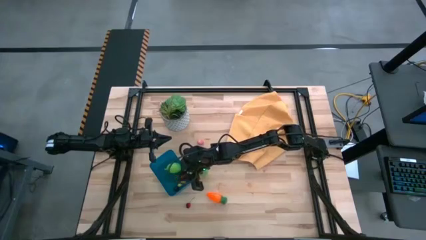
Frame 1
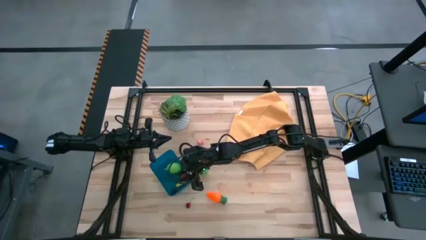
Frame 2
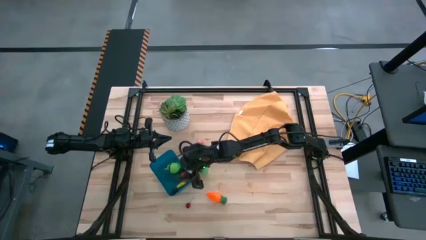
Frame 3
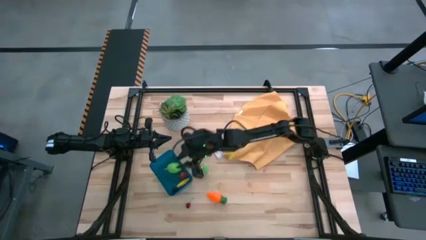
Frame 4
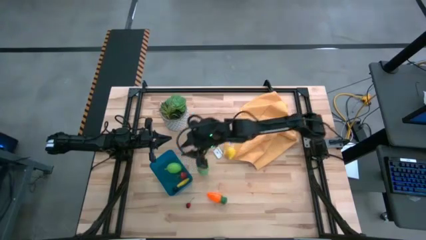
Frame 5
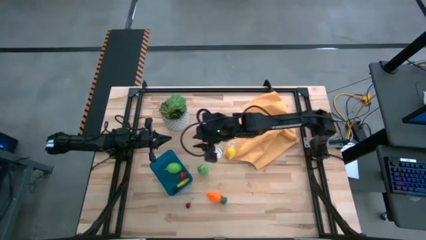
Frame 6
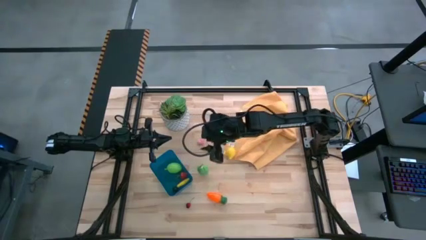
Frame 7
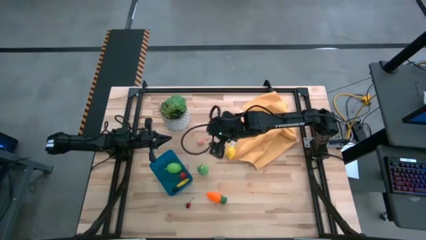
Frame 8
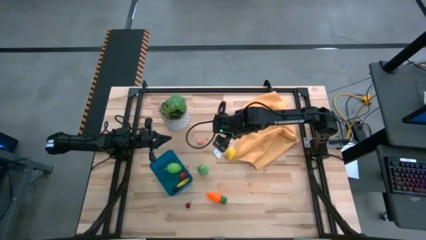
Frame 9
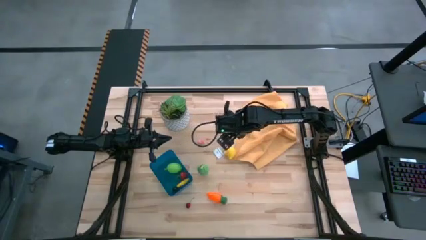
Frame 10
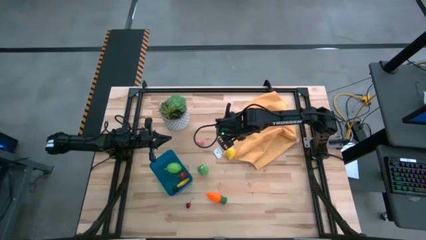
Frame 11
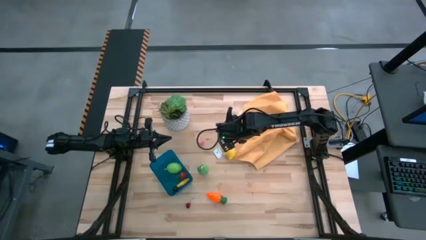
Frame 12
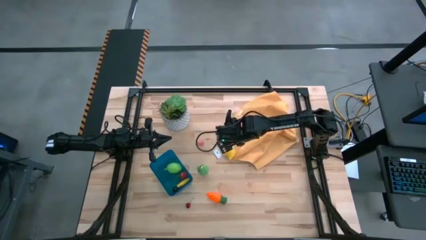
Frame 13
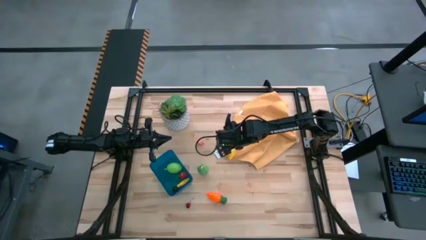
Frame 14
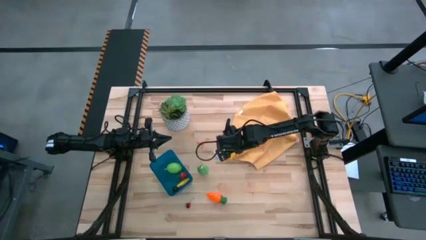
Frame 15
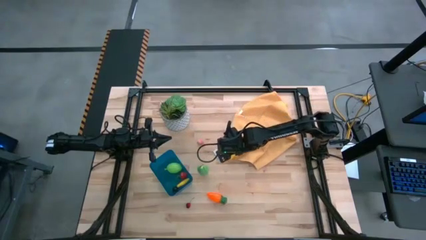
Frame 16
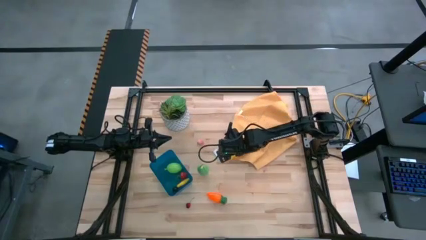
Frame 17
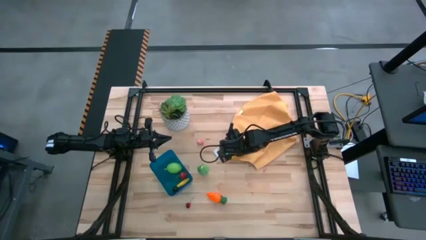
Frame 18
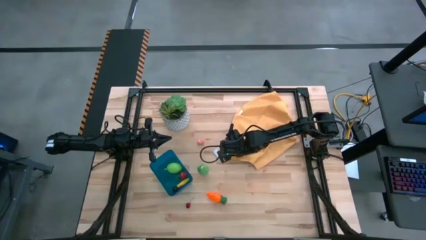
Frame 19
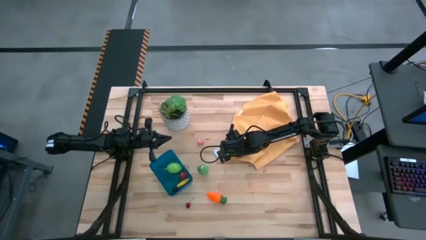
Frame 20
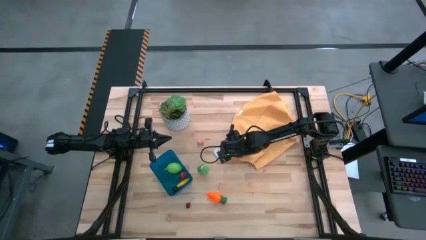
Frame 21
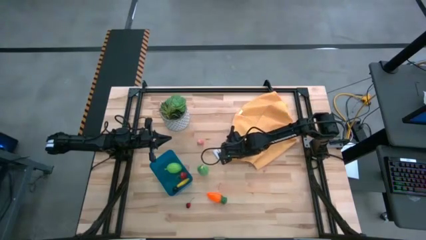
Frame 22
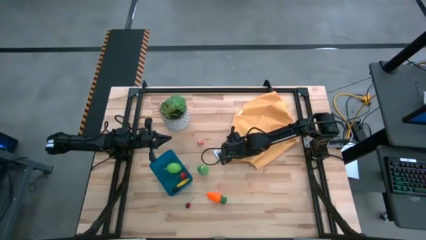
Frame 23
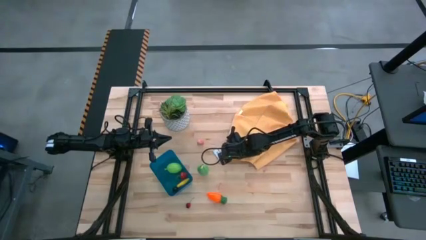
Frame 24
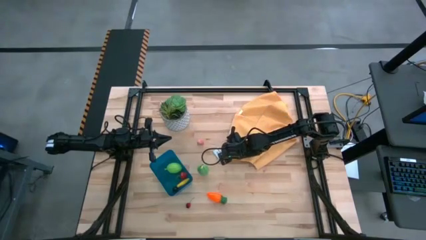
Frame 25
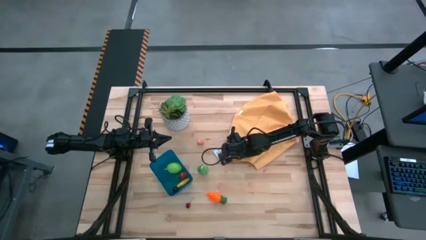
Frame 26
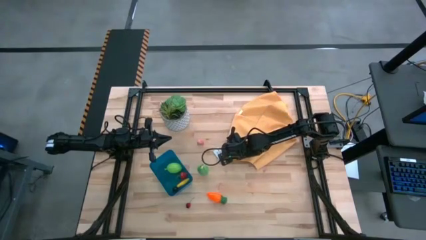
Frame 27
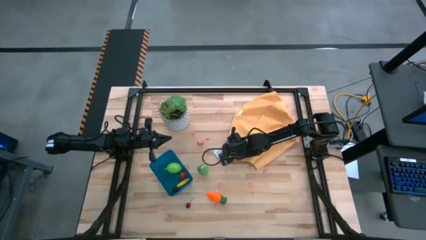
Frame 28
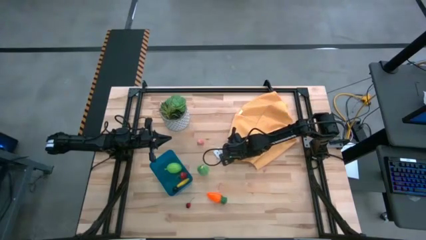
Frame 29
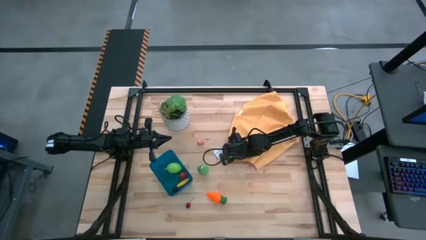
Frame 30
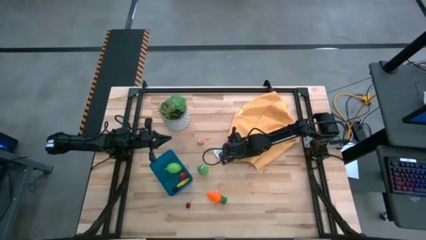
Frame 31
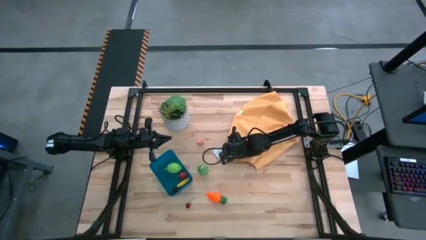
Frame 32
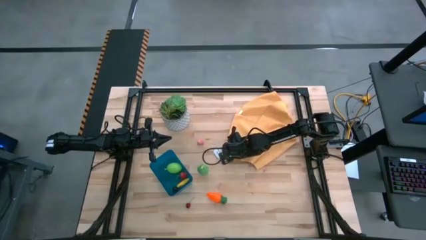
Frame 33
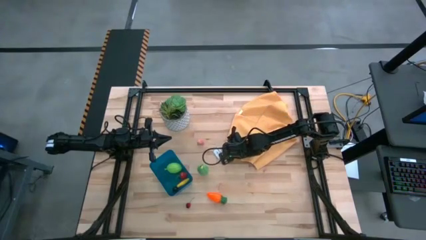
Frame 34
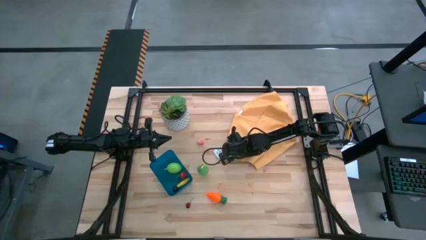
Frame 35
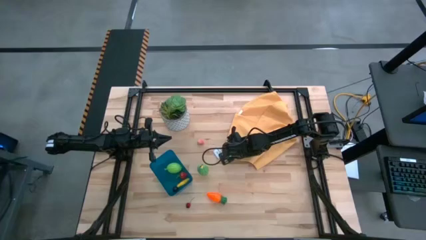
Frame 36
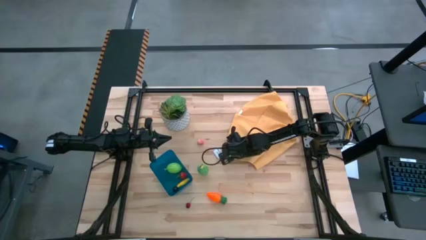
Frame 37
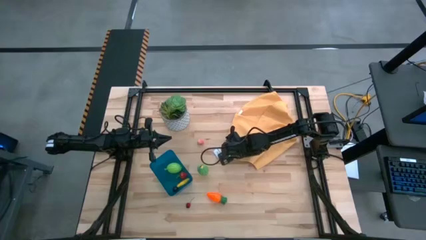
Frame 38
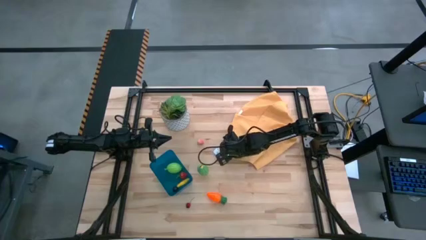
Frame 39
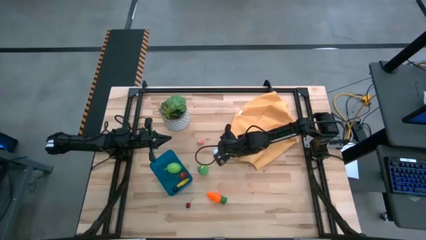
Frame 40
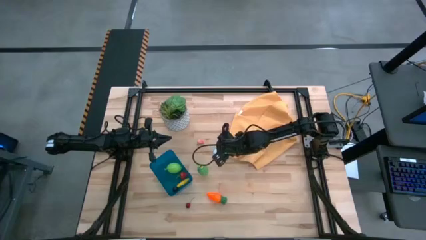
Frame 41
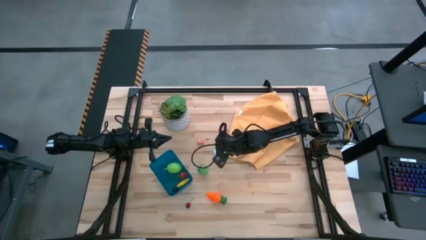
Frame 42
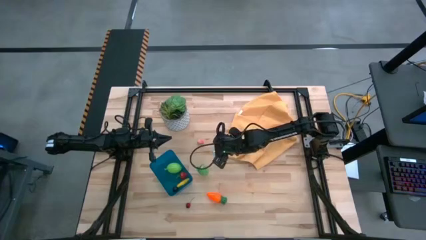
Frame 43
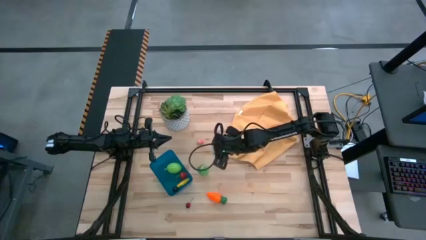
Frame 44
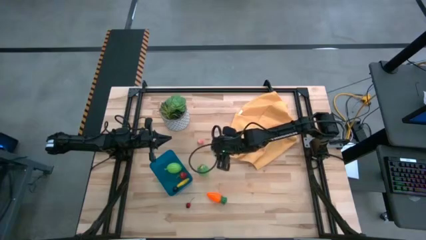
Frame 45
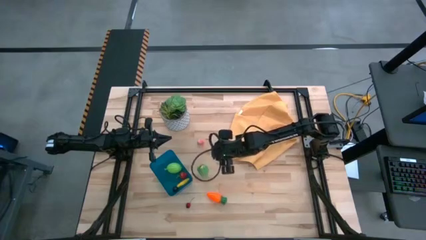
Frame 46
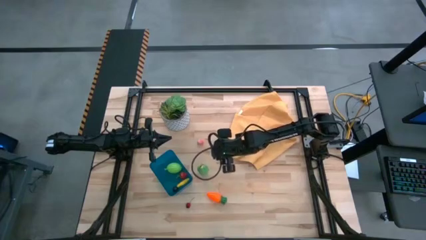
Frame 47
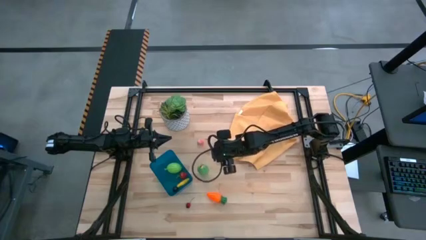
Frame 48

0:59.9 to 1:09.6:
Task: Pick and placing Produce into tupperware
Put the yellow lemon into the blue bin

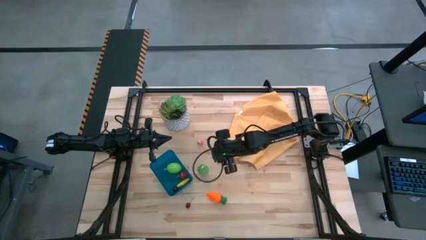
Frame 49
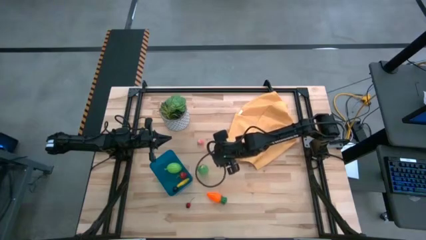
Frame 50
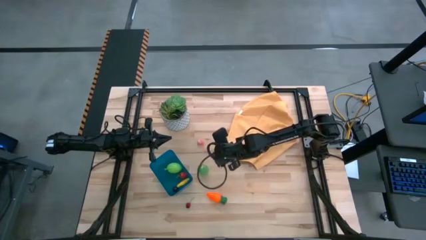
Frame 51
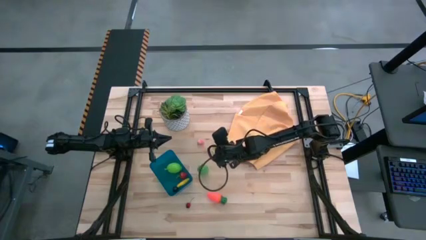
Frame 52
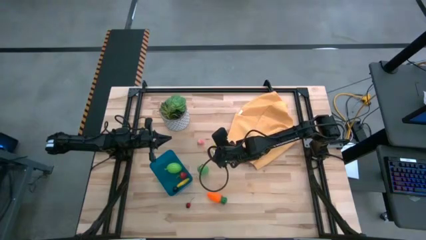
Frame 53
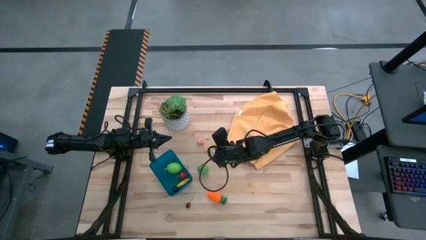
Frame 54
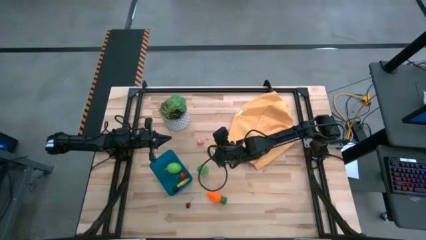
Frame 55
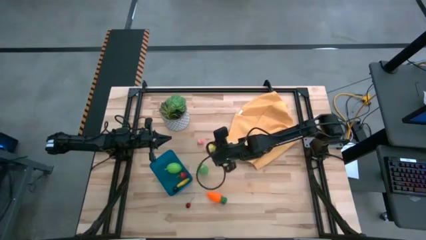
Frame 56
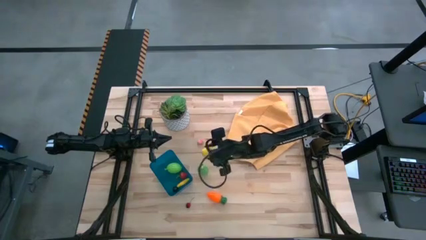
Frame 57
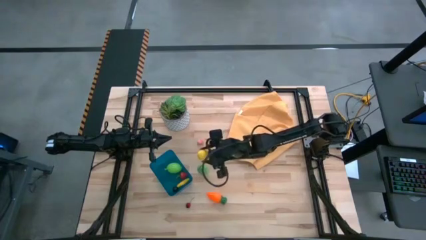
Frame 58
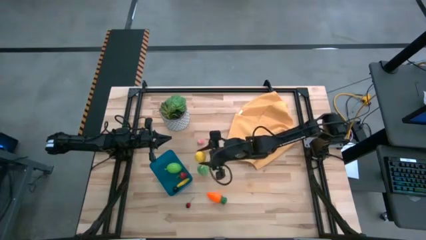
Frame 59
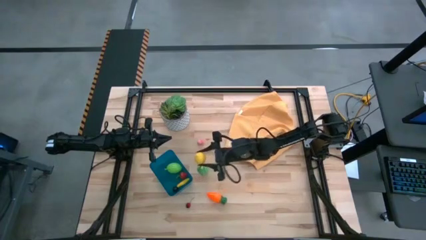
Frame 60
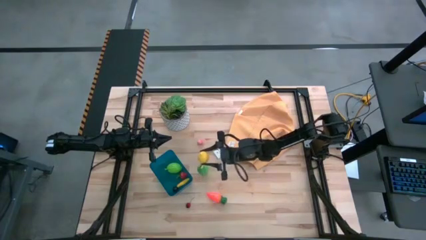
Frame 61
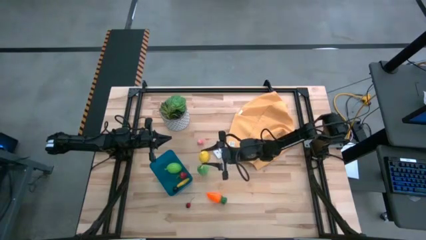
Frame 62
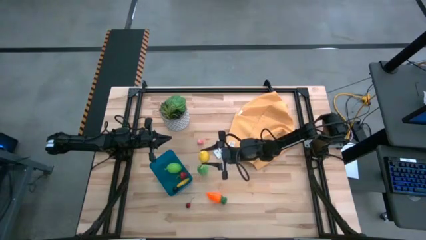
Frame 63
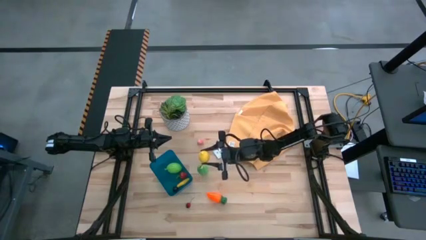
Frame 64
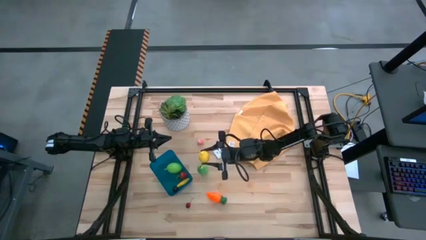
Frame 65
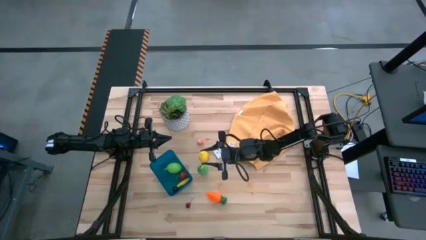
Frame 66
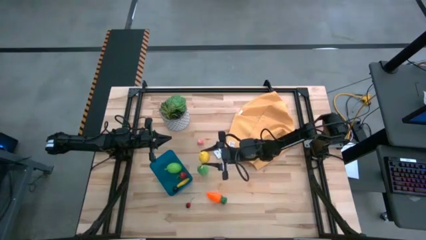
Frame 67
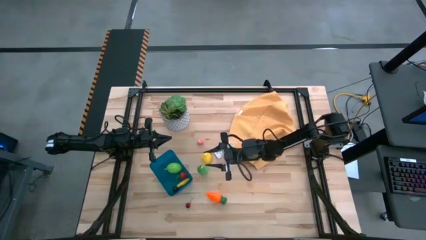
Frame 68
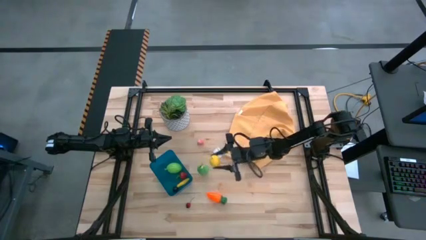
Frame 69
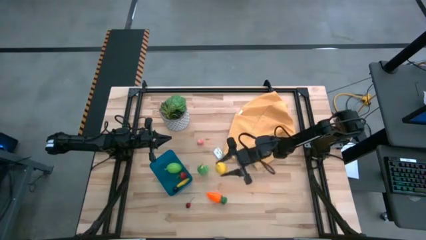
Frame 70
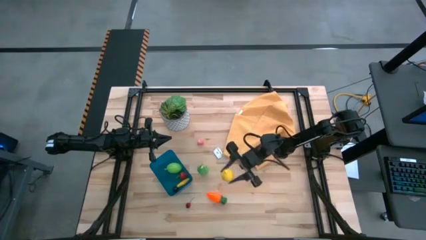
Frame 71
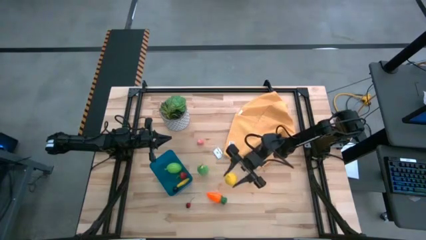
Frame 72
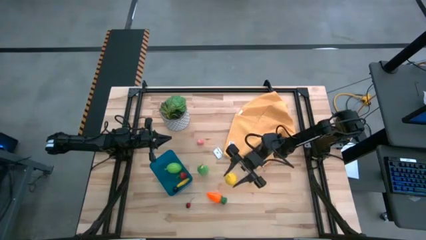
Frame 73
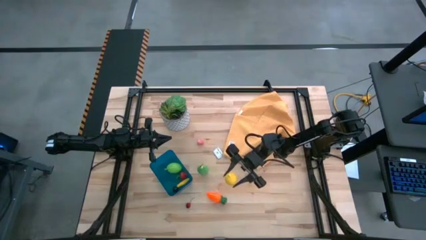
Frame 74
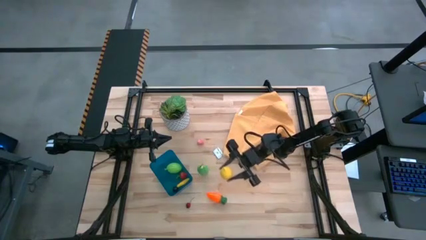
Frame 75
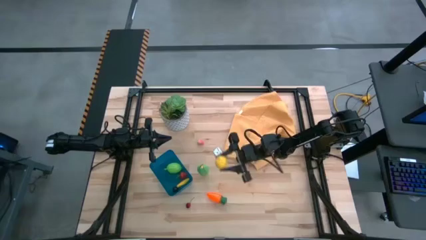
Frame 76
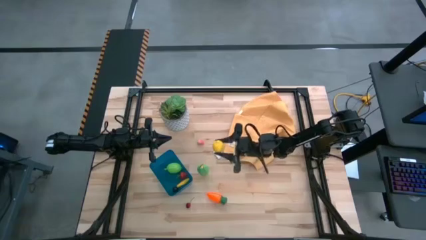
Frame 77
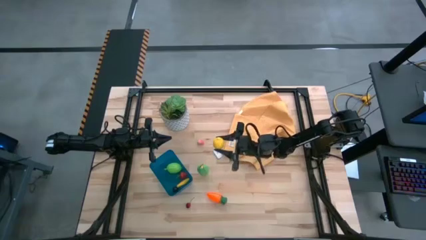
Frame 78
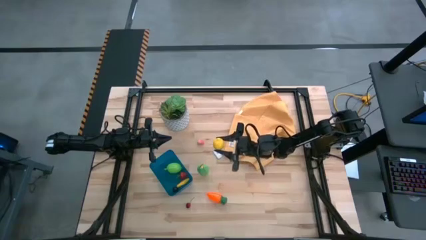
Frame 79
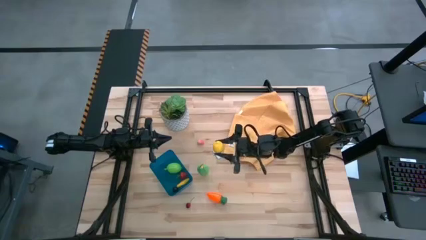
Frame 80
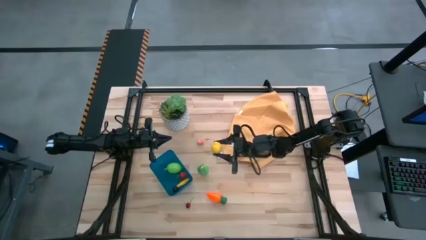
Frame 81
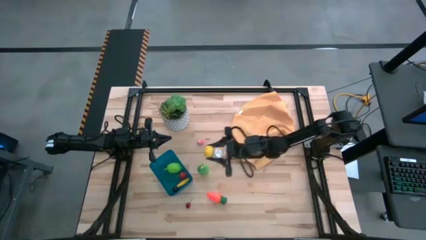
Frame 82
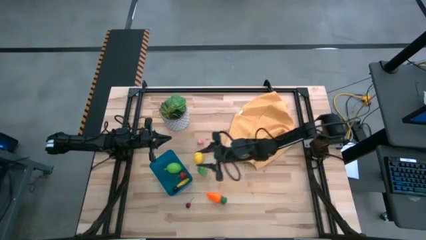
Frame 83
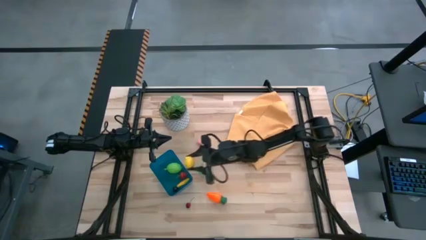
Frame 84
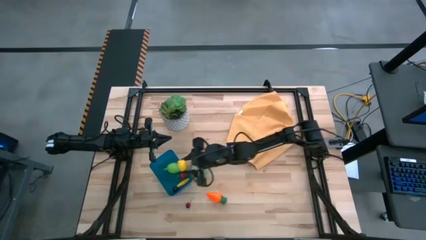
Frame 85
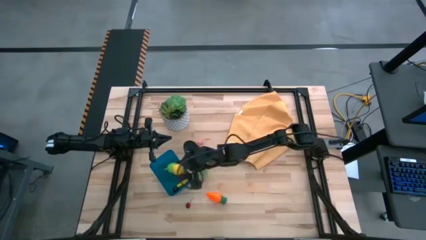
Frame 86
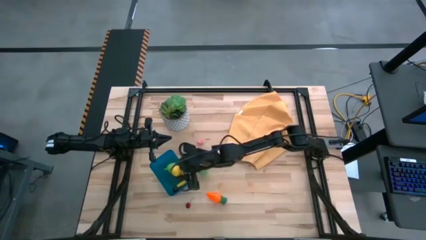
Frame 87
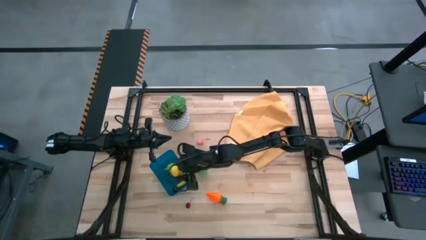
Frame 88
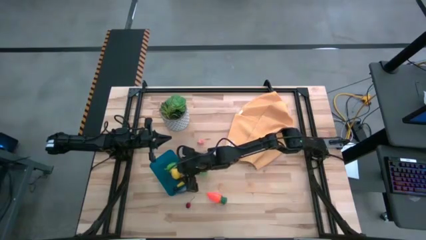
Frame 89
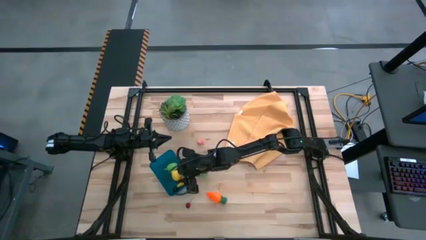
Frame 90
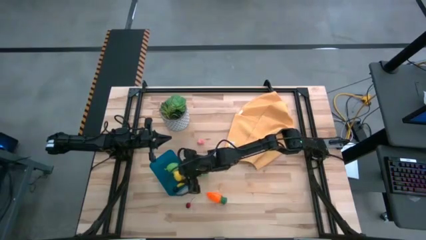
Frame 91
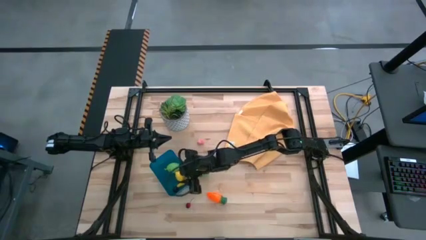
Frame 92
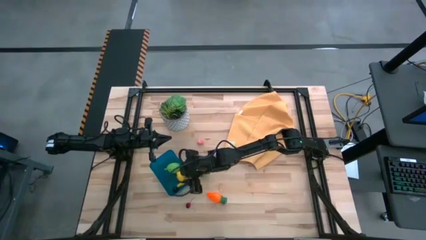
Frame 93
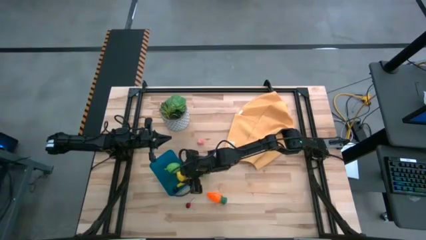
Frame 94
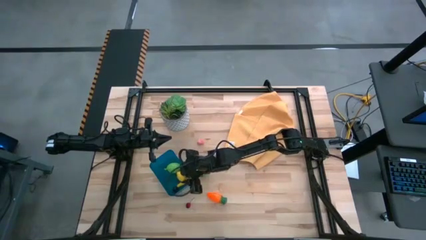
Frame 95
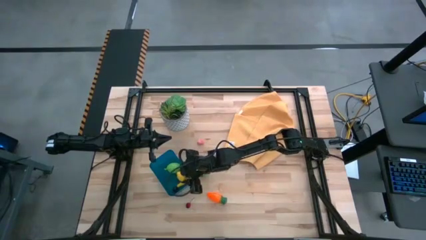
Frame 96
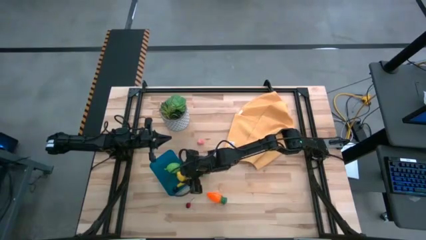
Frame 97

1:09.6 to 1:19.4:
Put the yellow lemon into the blue bin
